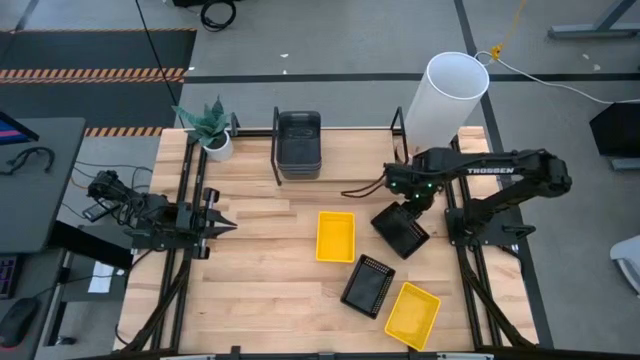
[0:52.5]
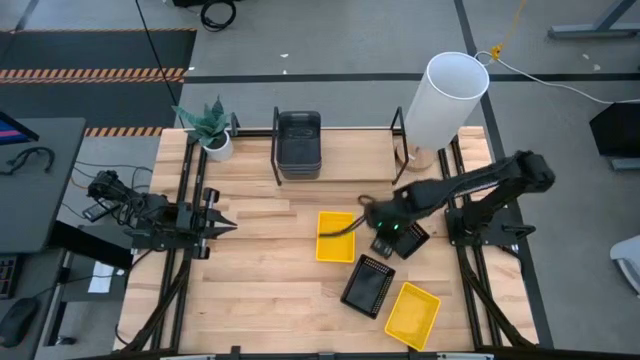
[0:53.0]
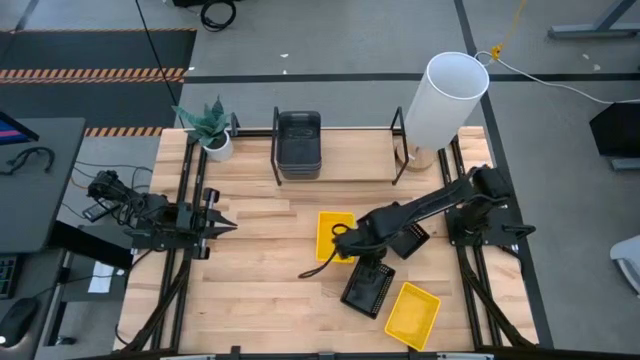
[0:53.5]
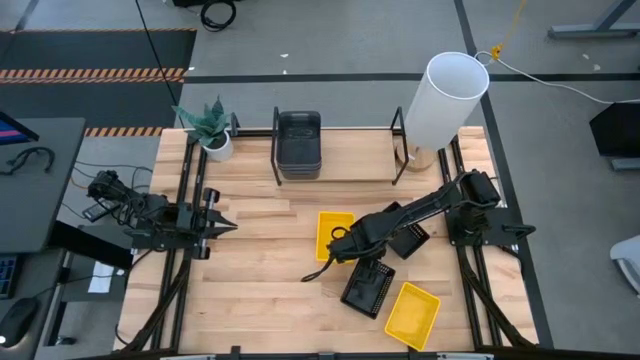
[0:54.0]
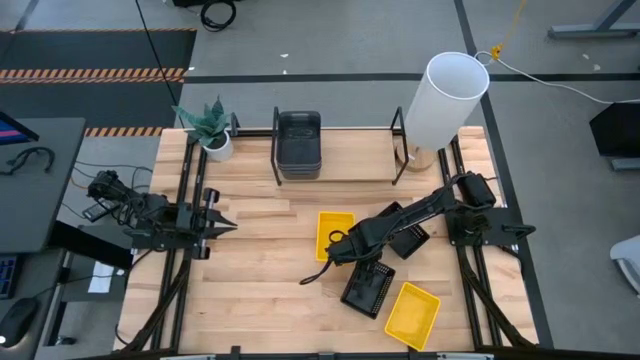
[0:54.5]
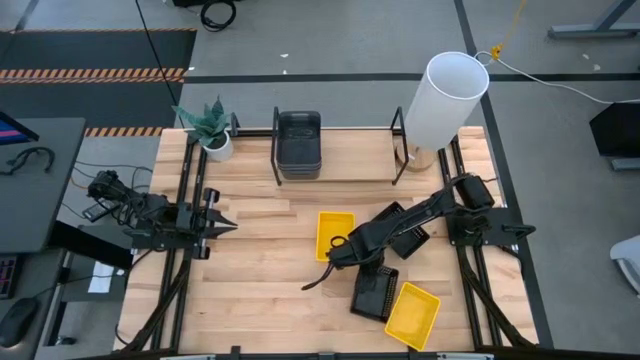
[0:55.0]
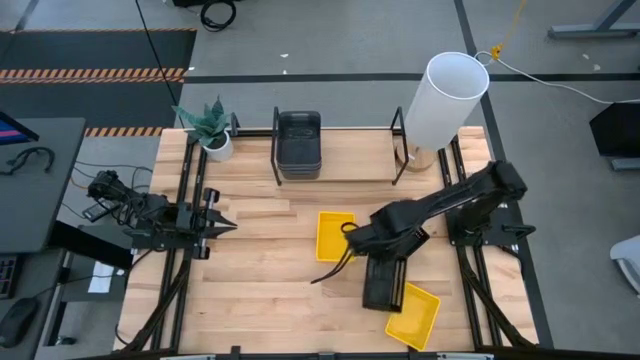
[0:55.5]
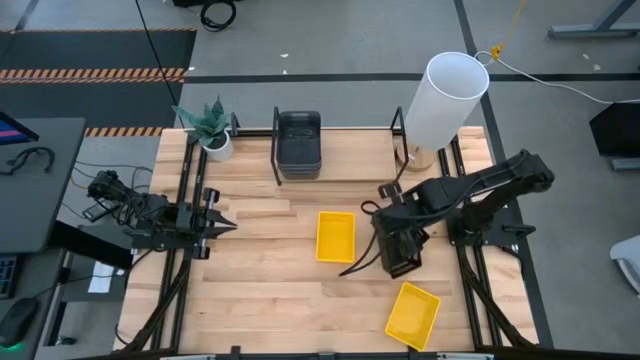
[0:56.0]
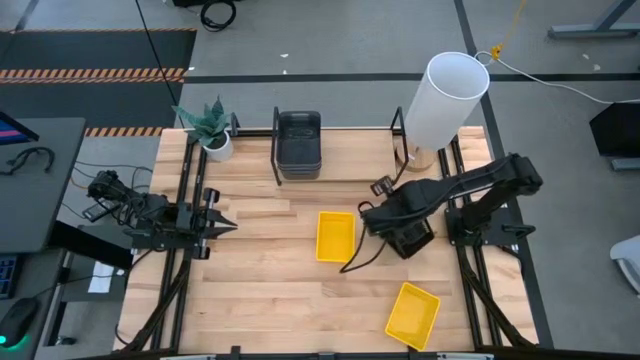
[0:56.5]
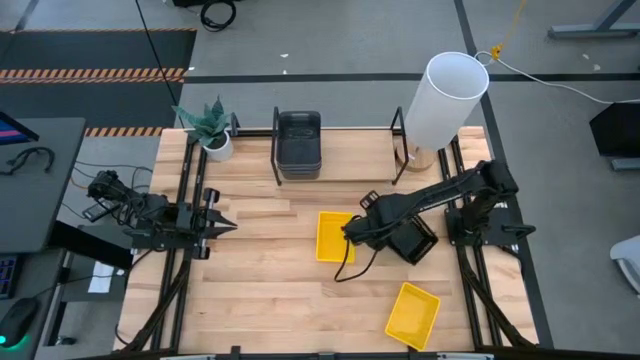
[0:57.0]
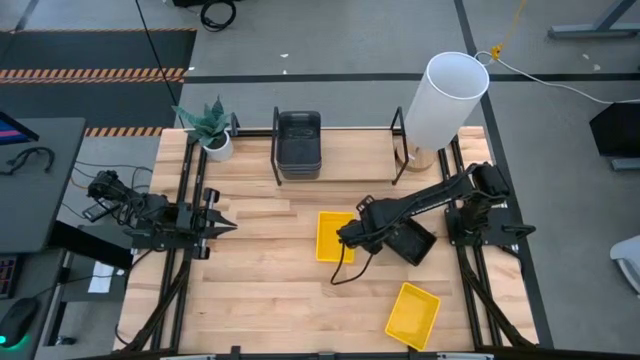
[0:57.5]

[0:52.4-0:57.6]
Task: Stack baskets on shelf by color
Stack the bottom black basket on top of the top black basket

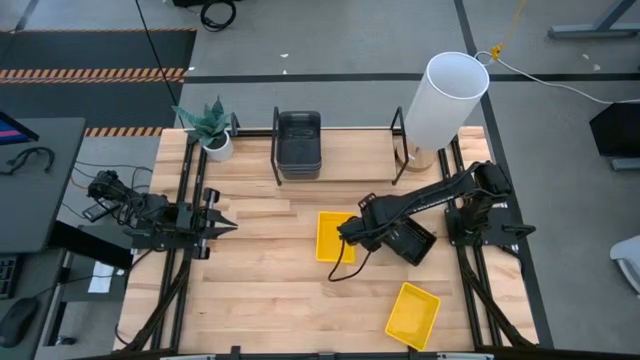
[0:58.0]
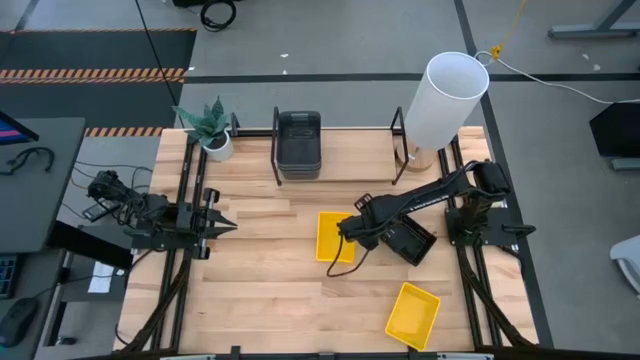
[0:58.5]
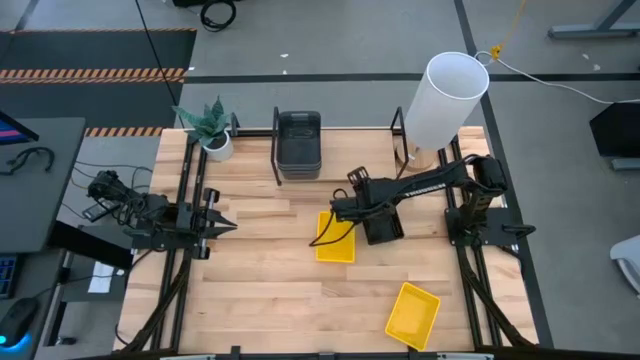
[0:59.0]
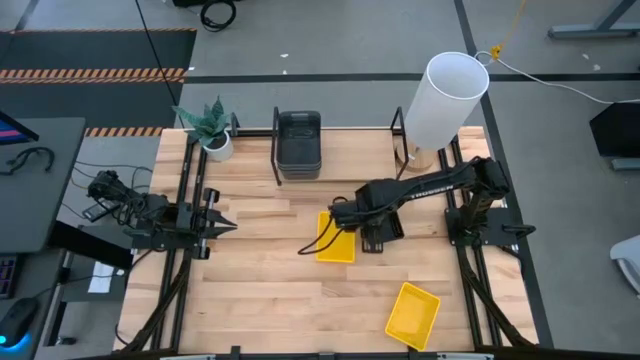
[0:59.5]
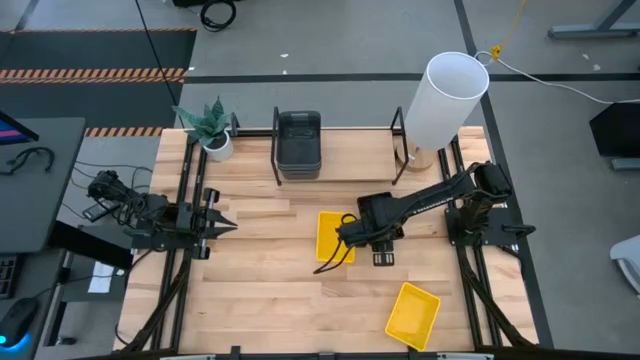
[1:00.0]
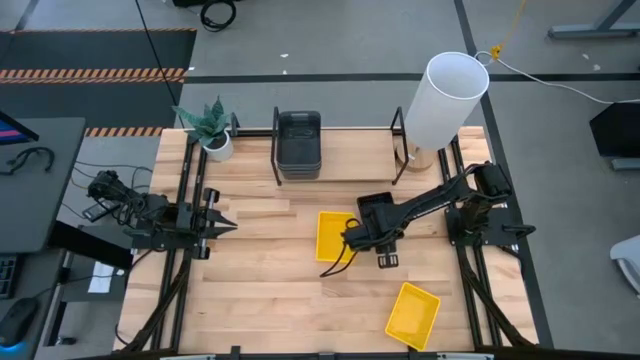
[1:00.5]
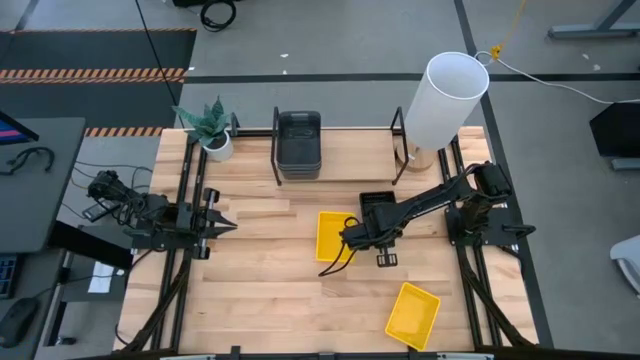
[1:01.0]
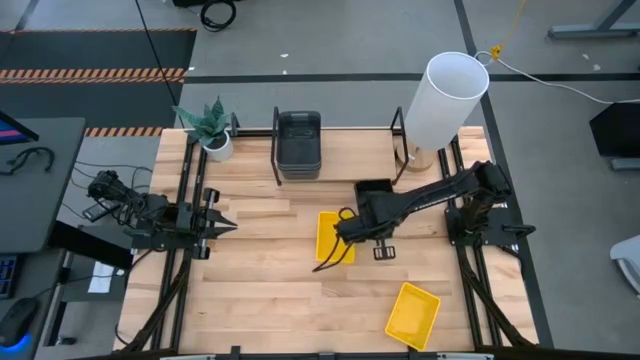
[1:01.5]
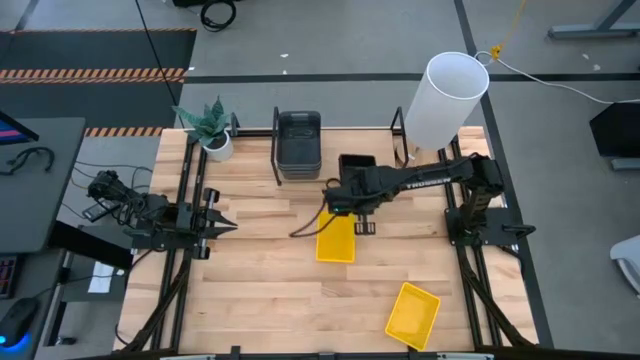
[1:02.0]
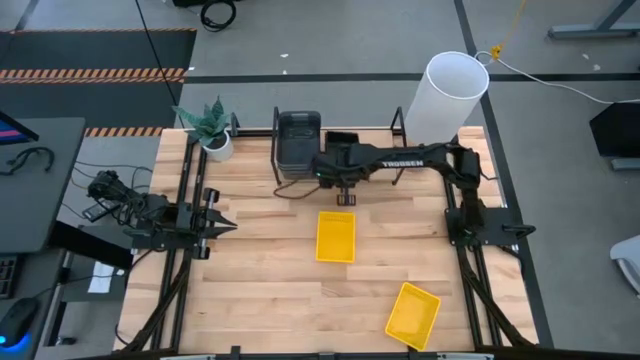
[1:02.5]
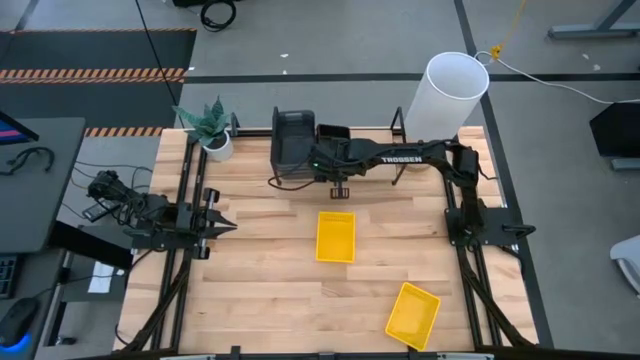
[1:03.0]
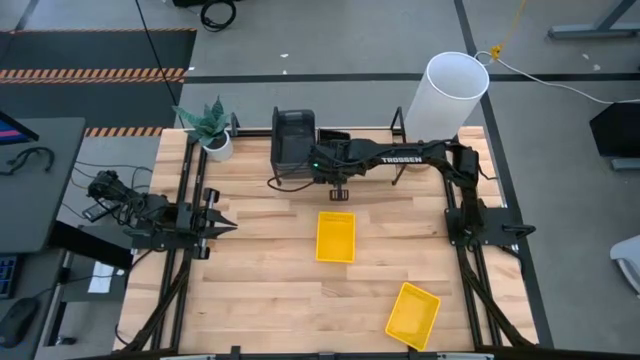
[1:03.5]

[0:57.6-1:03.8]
Put the stacked black baskets on the shelf

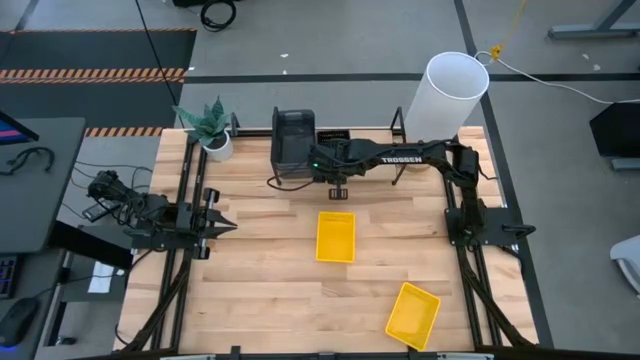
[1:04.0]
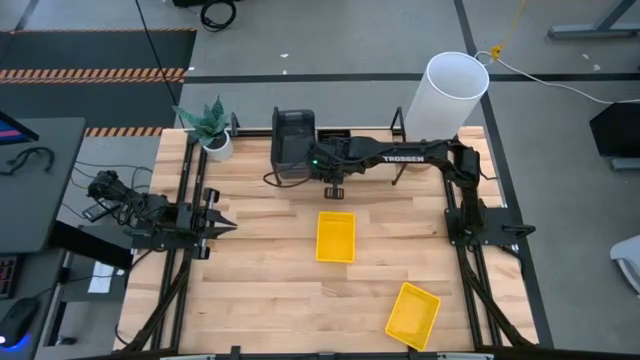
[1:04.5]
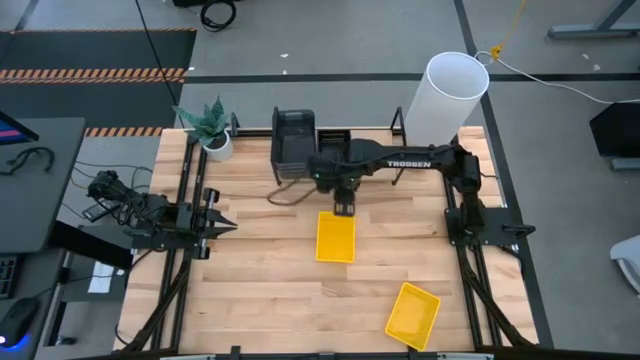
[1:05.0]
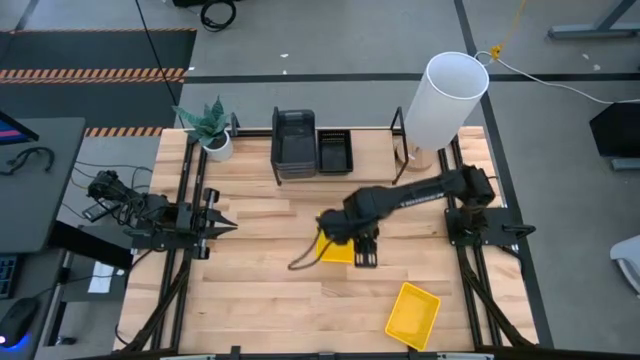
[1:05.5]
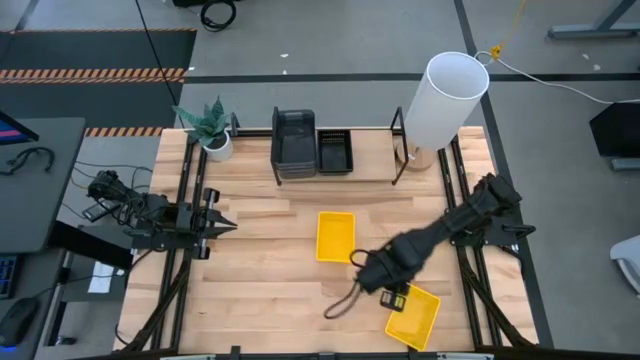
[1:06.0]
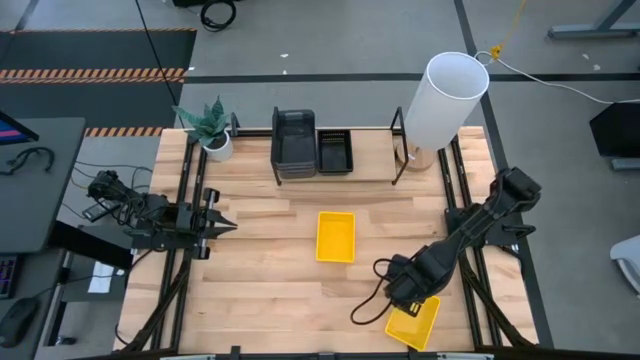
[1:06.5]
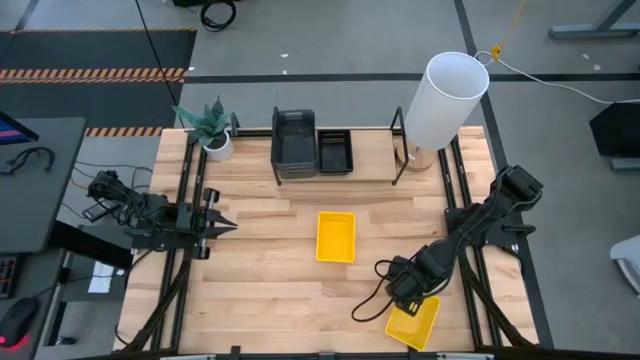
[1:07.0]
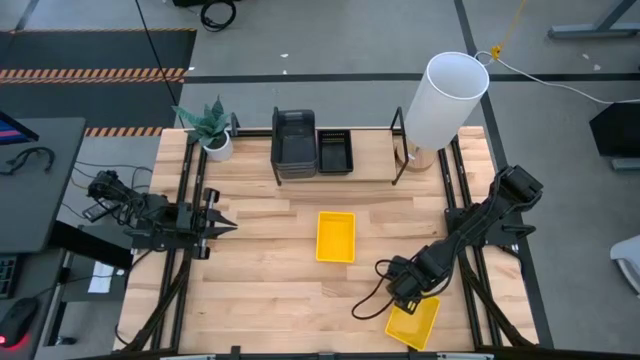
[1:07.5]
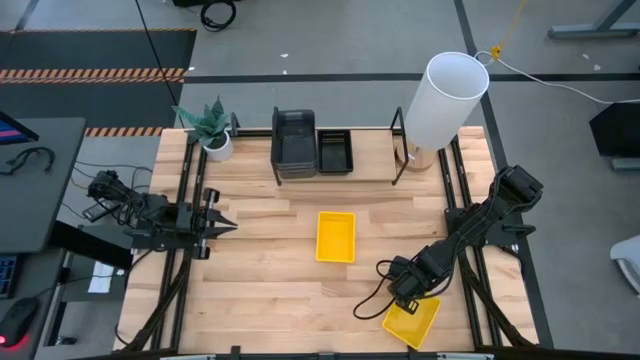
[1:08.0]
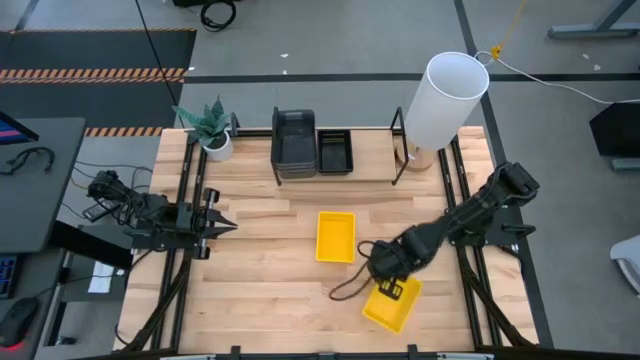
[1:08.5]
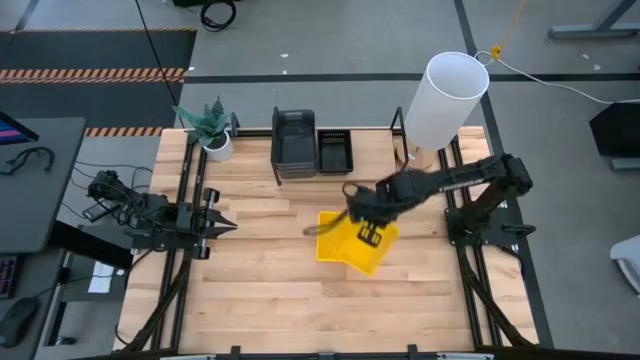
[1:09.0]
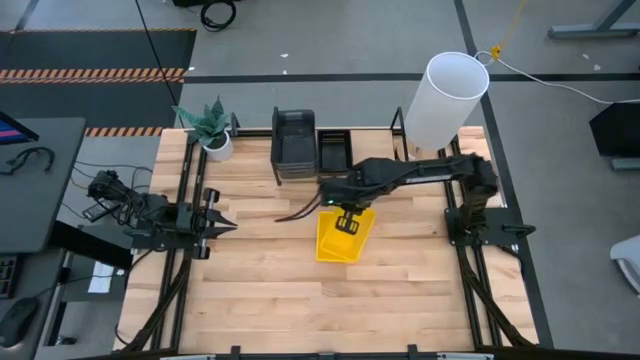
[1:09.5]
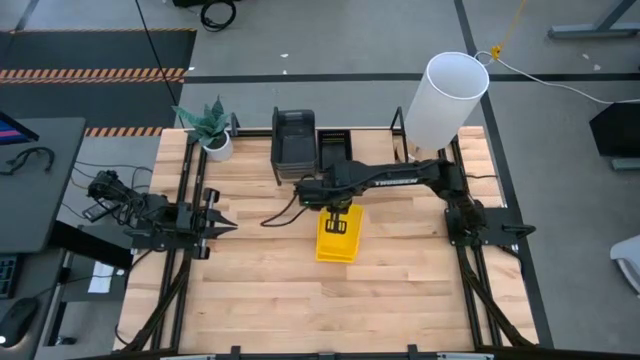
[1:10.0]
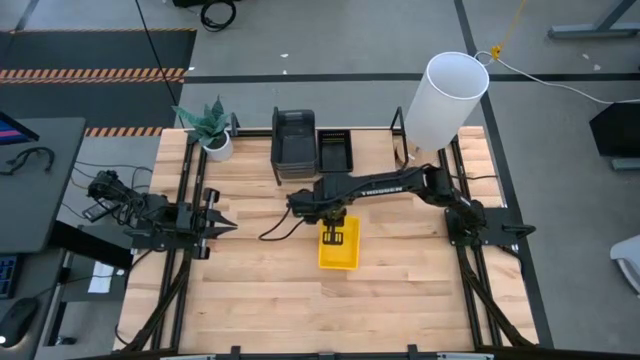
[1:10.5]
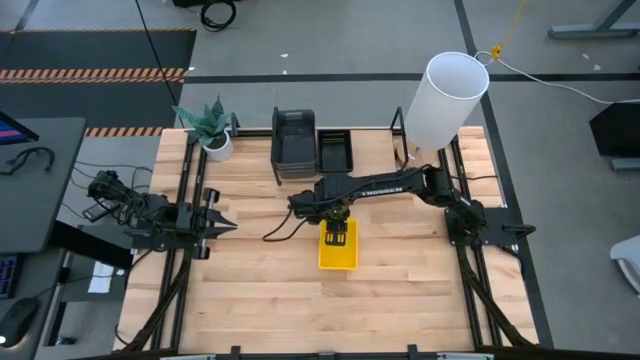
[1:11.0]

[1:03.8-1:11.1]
Stack the bottom yellow basket on top of the top yellow basket

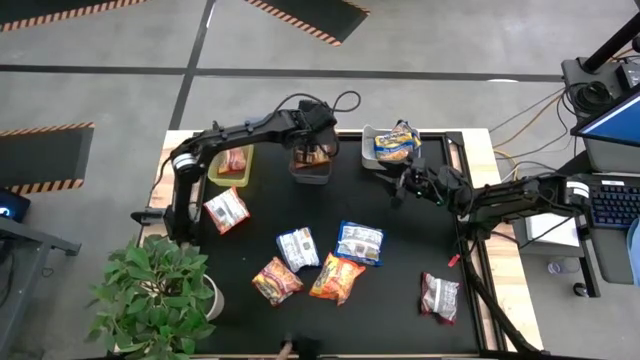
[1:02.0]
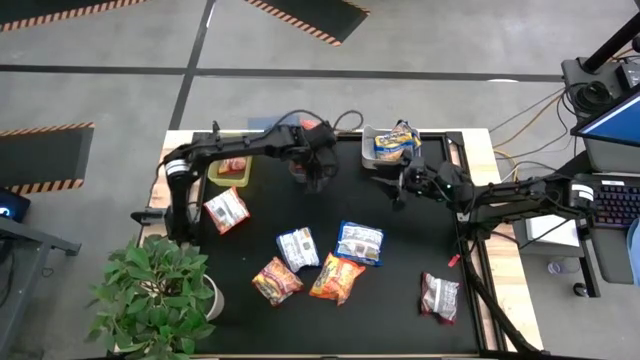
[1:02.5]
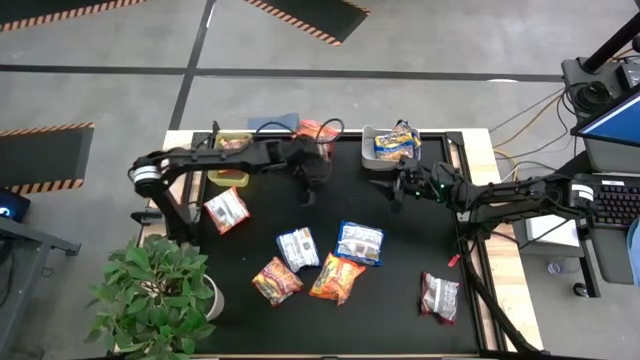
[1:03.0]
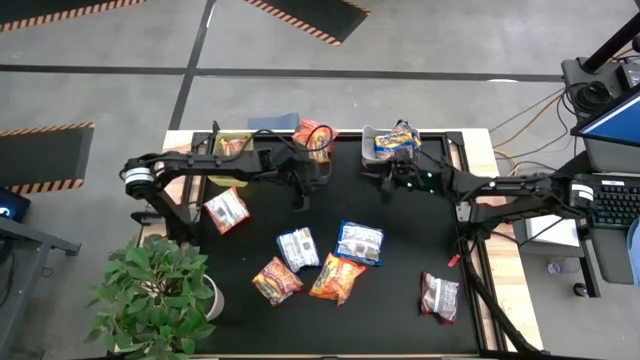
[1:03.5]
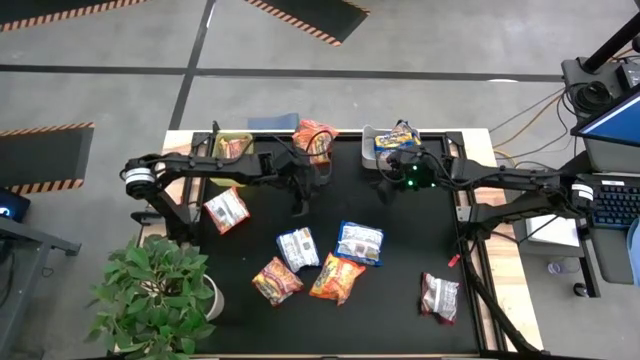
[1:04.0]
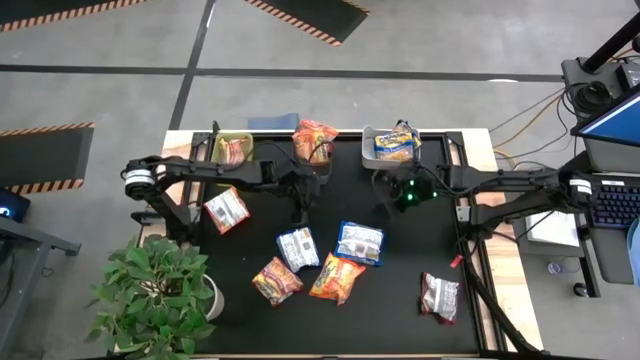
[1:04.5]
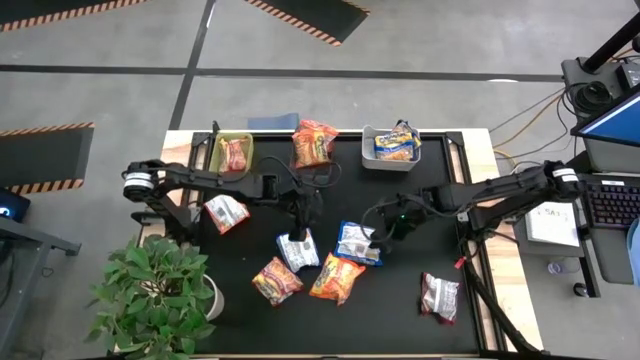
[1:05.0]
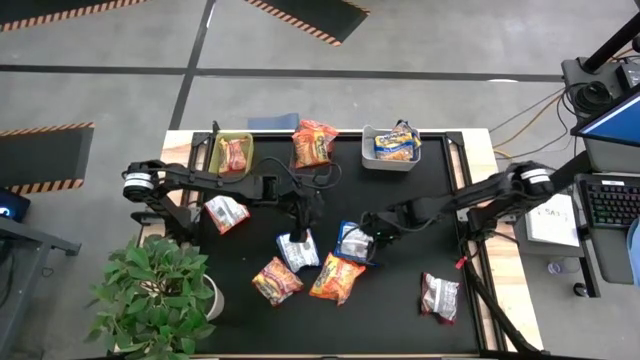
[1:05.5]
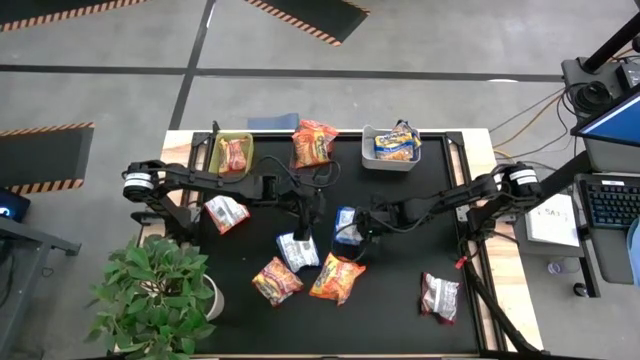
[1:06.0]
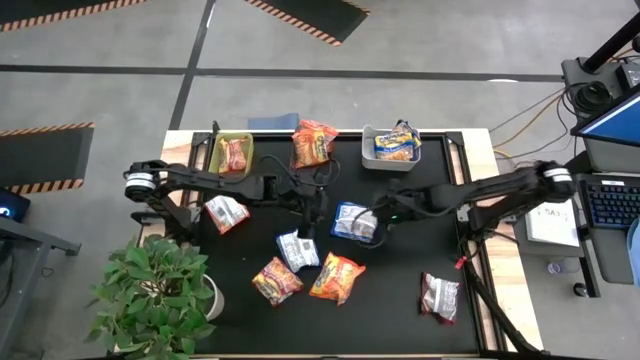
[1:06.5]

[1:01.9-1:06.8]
Task: Sort Maruchan noodles
Put the blue noodle pack into the white bin
